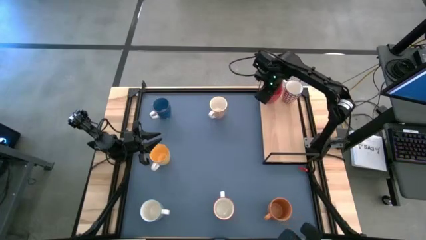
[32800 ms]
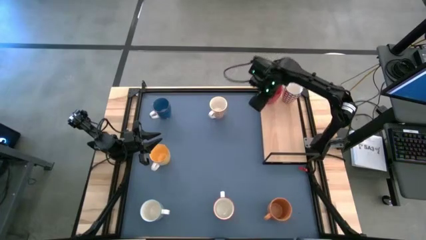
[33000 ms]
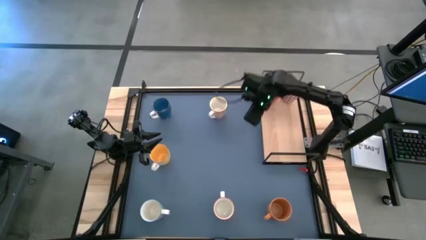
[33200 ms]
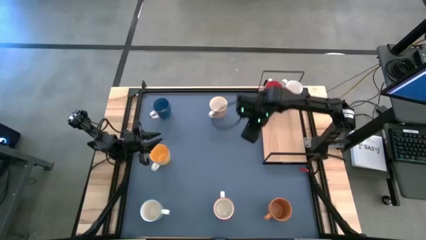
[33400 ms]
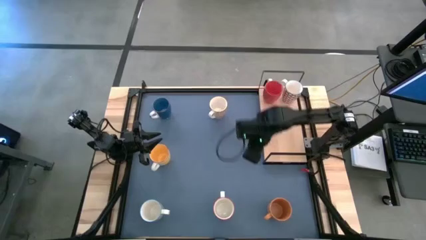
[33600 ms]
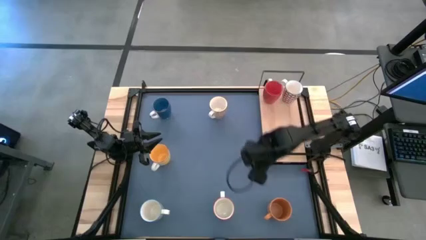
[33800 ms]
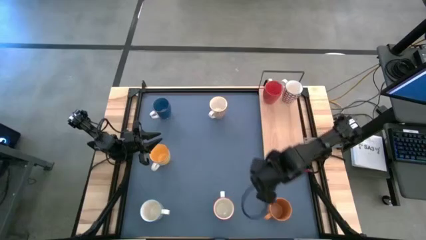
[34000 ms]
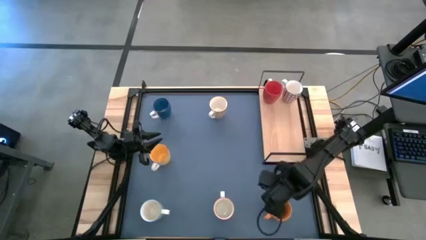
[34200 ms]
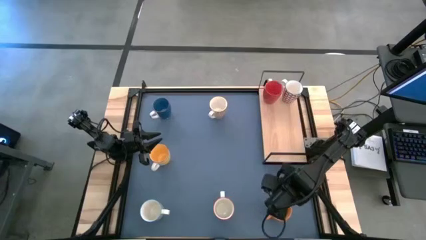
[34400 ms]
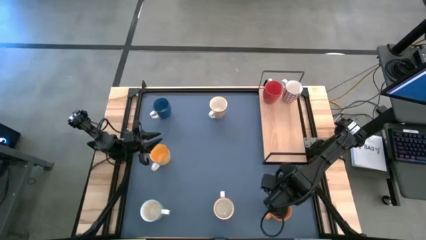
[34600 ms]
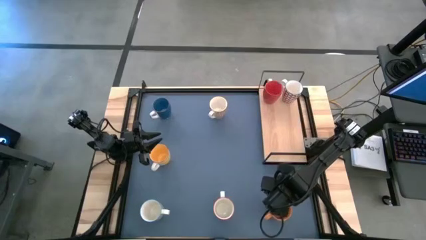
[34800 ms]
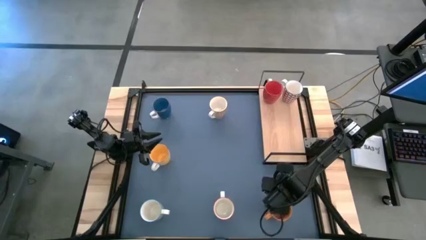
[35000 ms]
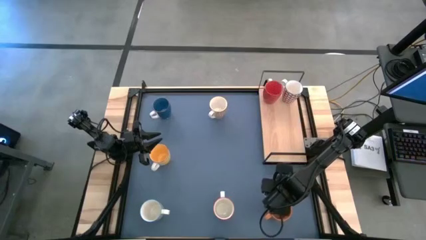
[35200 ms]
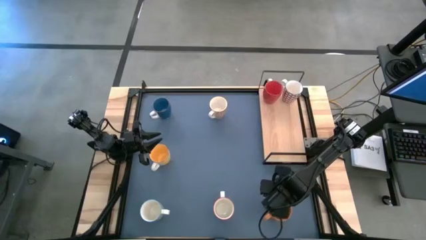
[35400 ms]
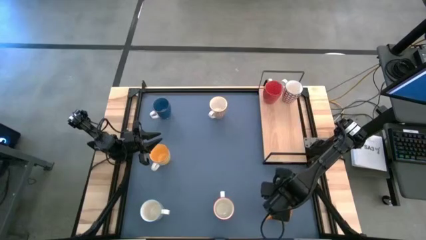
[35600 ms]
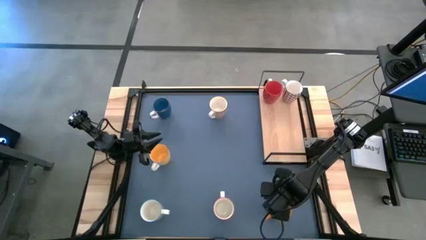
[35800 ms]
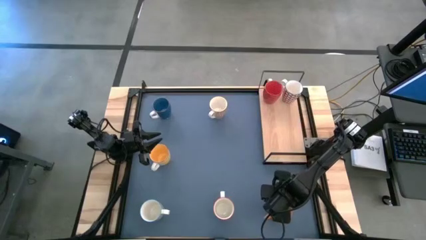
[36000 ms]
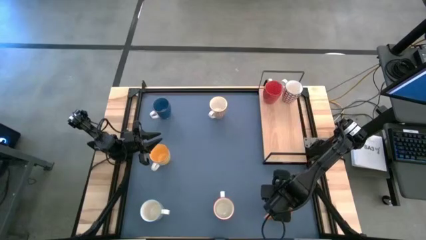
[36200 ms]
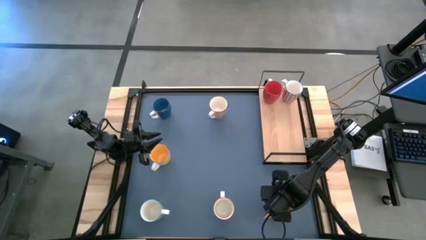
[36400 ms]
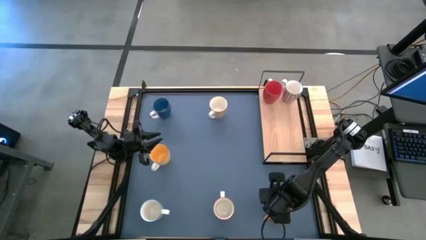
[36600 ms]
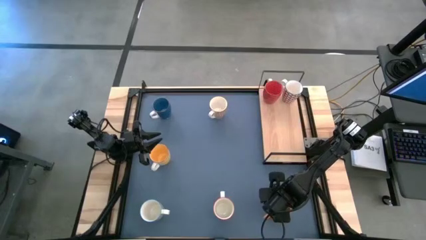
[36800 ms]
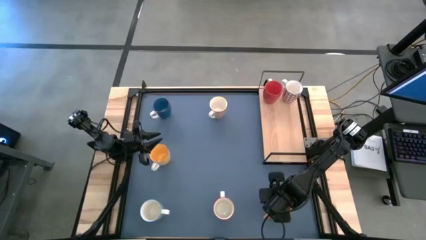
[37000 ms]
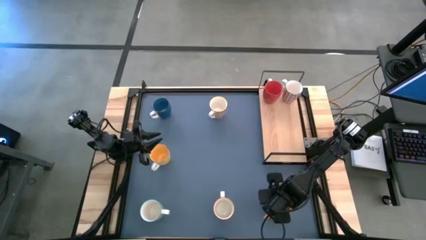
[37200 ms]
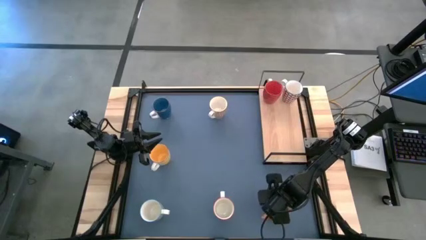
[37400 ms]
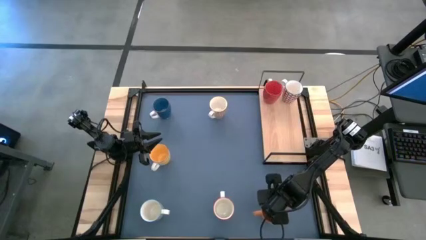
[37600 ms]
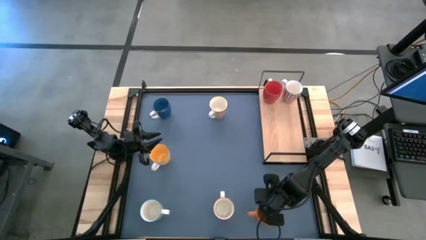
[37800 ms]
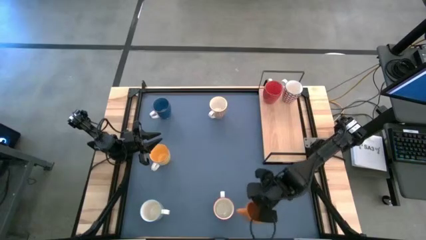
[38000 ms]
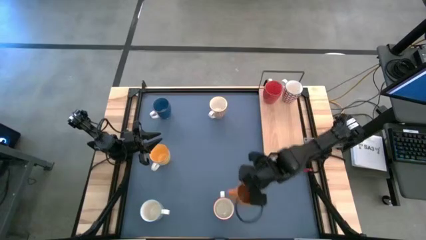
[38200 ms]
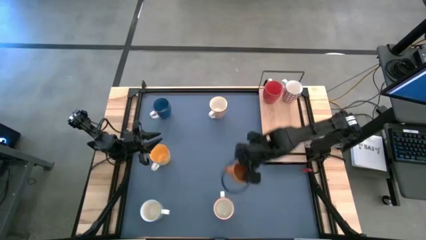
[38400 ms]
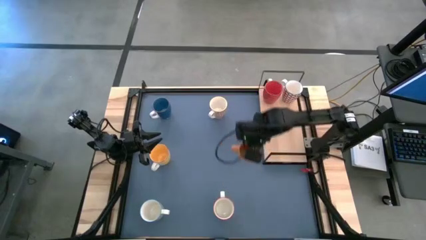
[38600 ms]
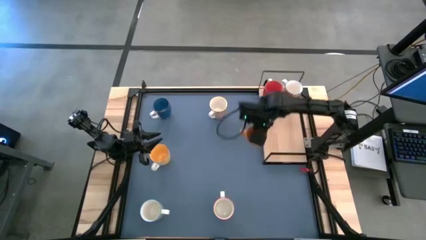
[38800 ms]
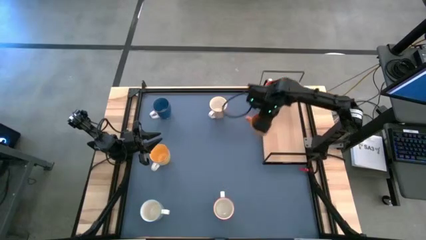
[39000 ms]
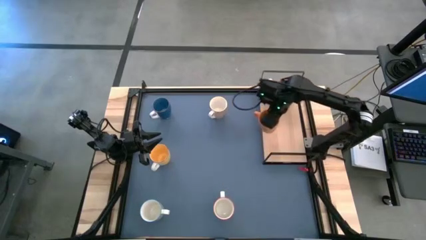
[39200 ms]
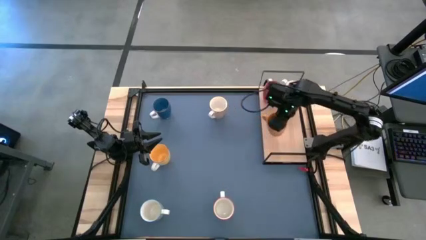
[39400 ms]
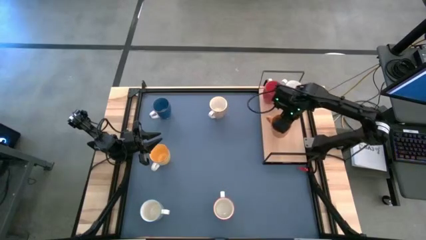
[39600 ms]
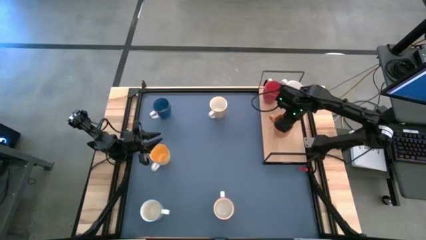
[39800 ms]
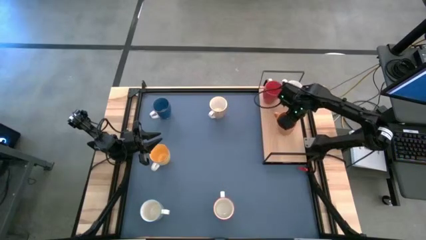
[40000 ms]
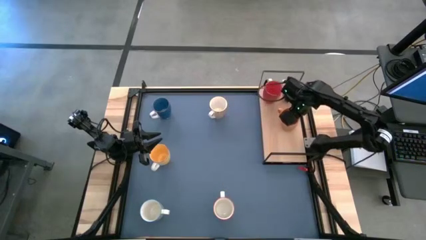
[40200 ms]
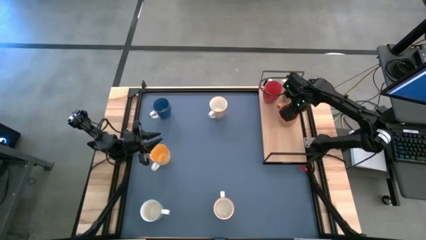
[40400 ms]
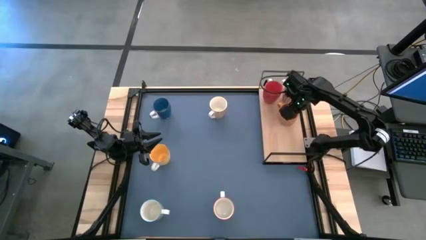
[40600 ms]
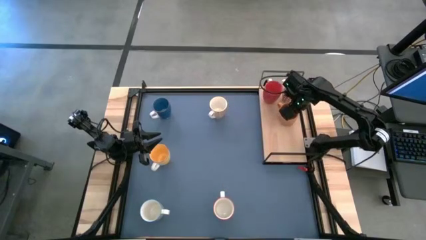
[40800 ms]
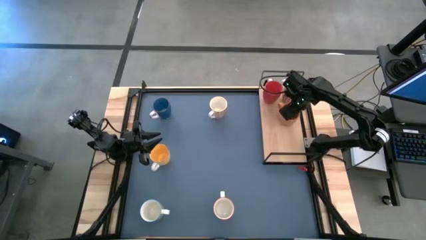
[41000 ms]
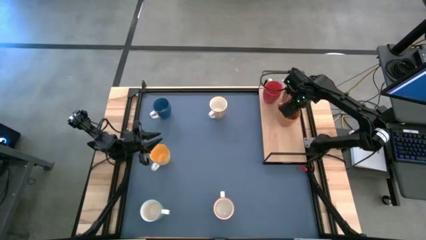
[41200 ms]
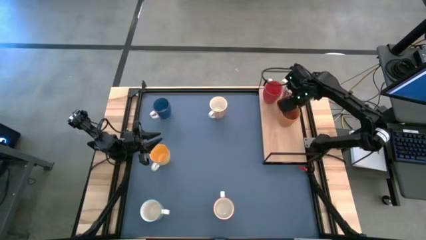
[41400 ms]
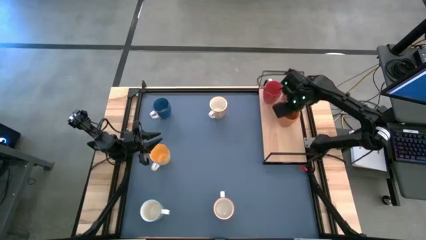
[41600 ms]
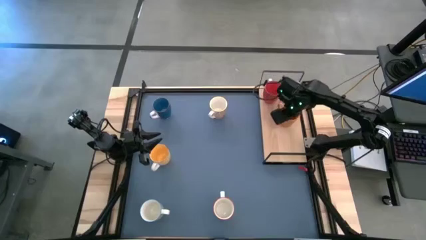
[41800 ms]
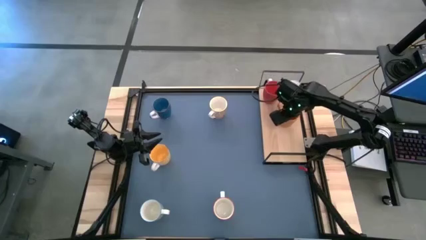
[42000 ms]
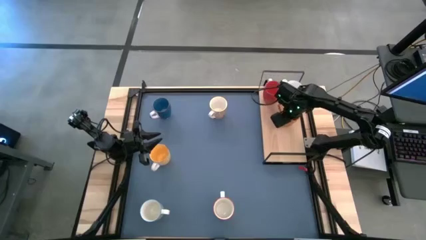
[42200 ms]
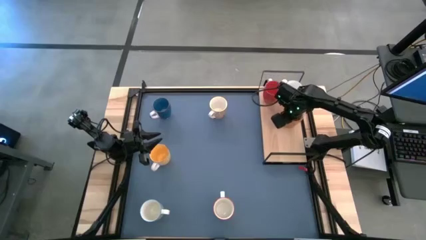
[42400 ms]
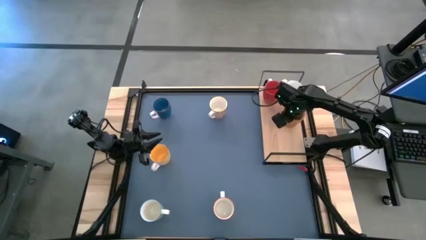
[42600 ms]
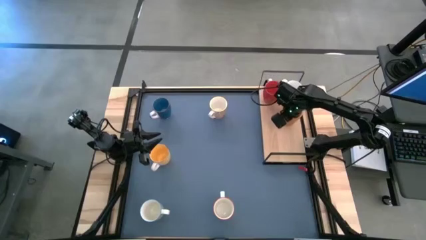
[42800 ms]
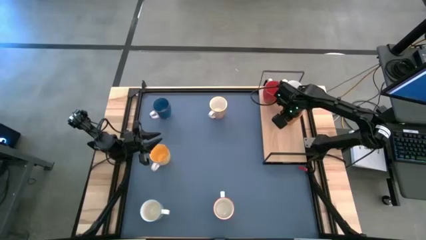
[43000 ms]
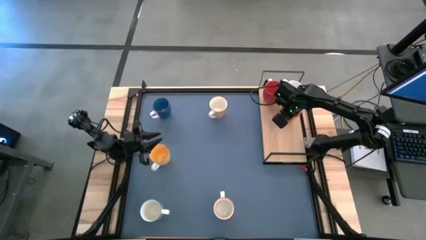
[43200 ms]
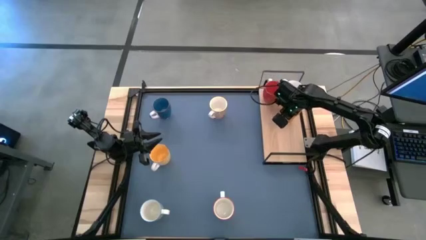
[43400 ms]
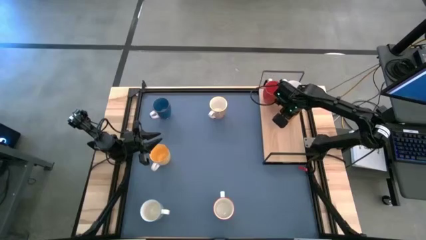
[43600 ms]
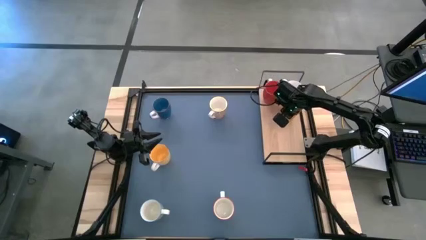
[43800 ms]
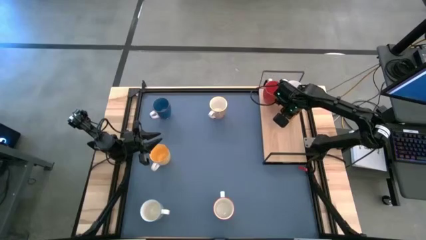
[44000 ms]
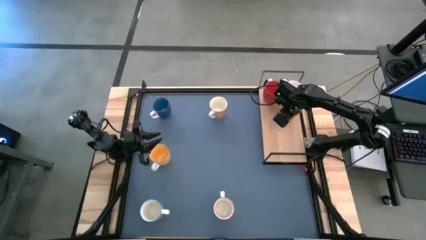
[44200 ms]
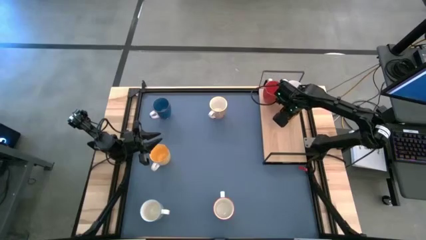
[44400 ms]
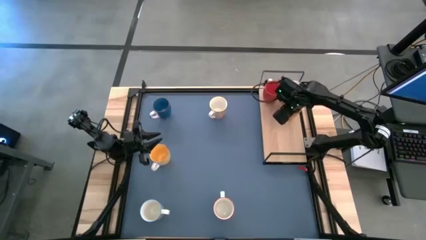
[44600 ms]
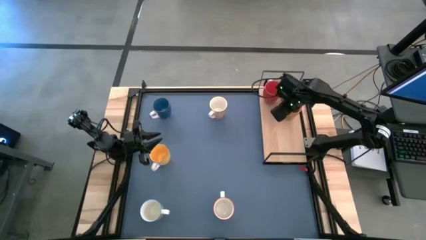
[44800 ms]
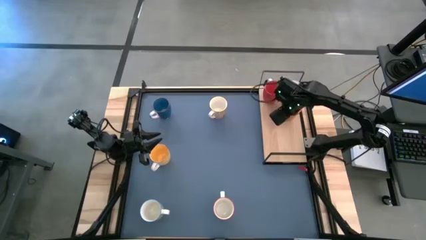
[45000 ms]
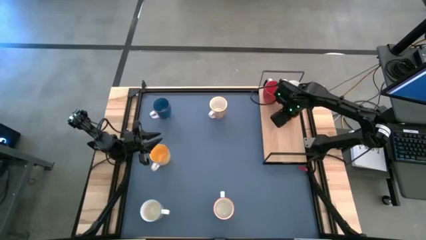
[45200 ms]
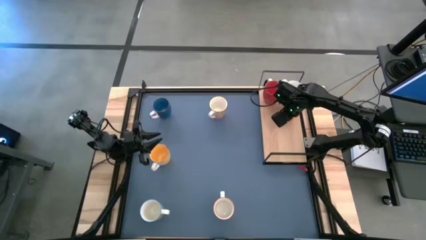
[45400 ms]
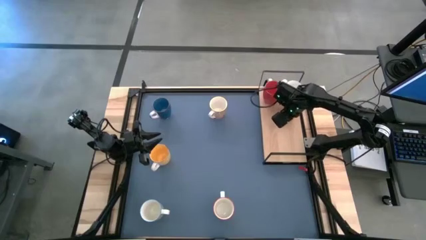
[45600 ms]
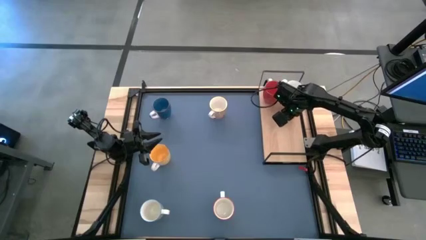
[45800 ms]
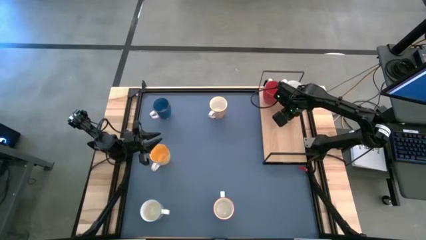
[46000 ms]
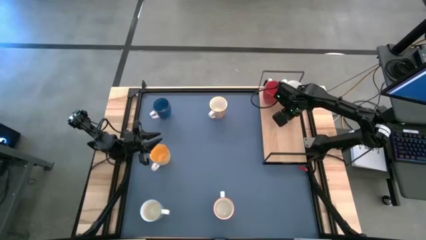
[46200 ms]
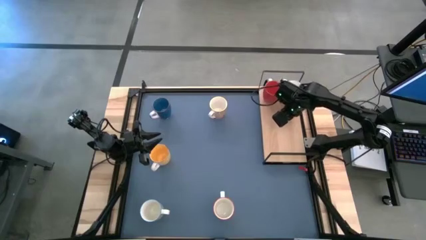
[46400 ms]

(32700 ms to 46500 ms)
Task: Place coffee mugs
Put the orange mug on the shelf

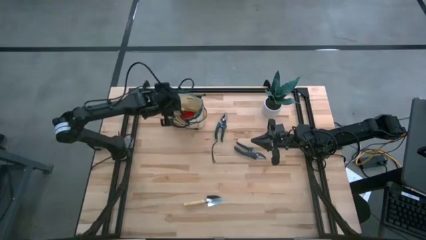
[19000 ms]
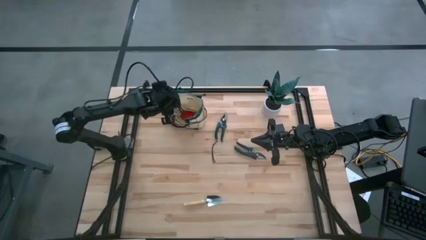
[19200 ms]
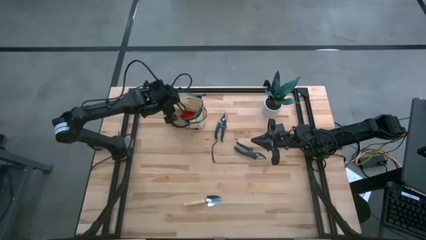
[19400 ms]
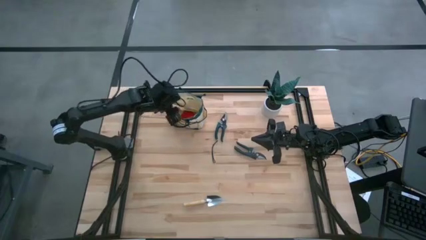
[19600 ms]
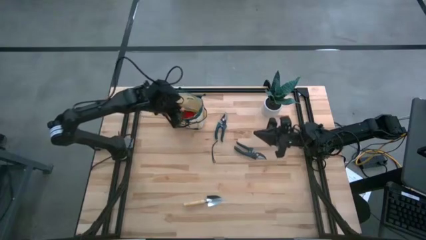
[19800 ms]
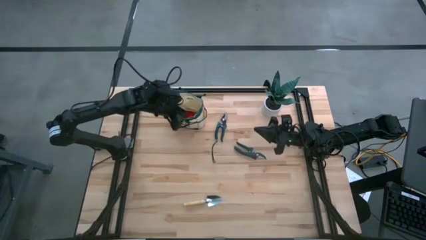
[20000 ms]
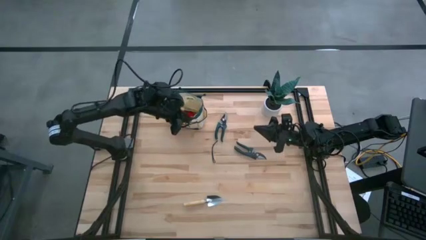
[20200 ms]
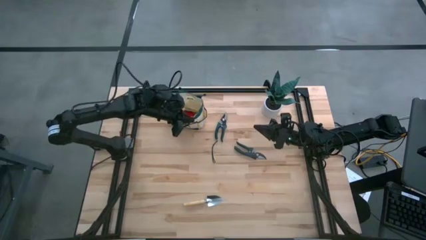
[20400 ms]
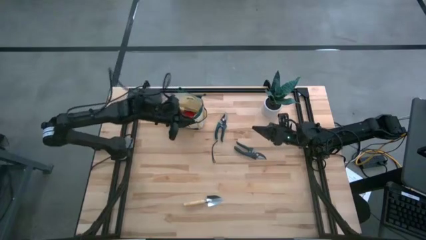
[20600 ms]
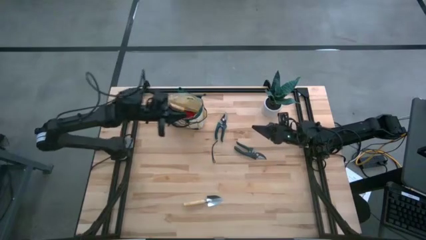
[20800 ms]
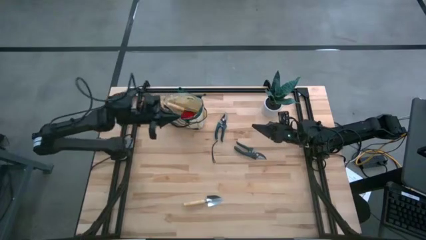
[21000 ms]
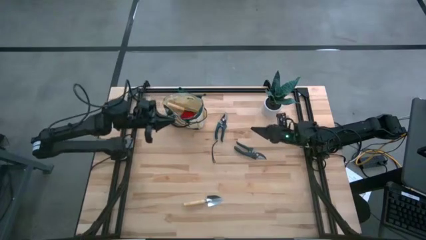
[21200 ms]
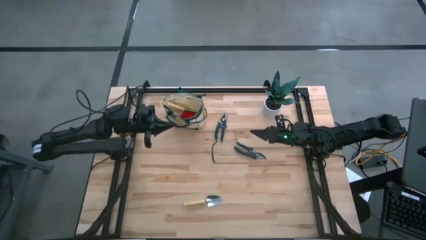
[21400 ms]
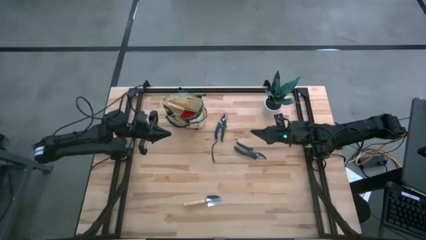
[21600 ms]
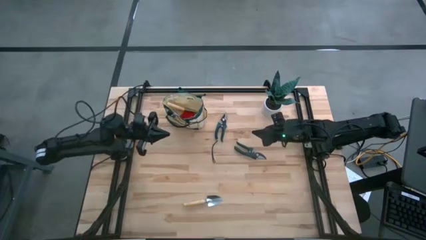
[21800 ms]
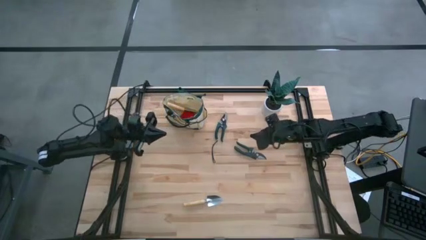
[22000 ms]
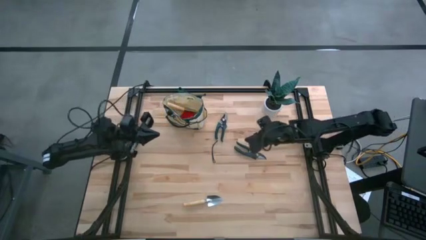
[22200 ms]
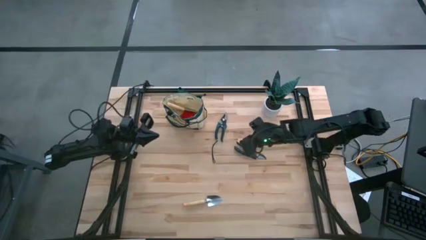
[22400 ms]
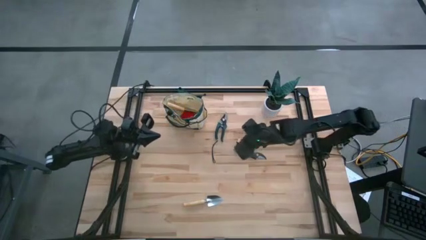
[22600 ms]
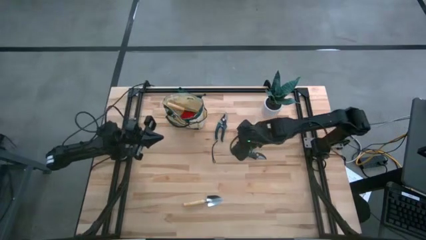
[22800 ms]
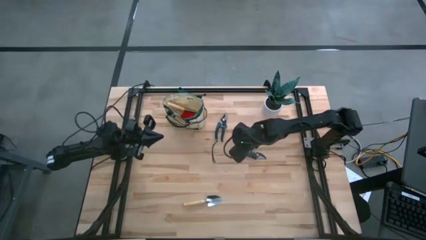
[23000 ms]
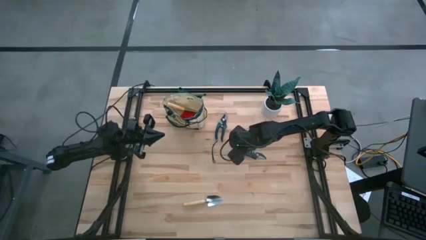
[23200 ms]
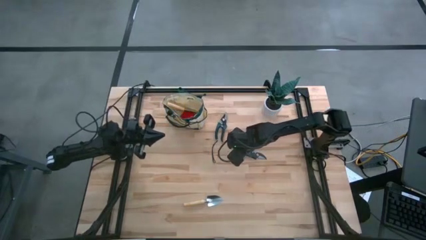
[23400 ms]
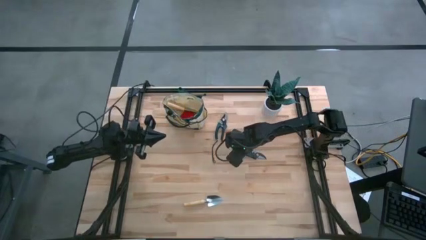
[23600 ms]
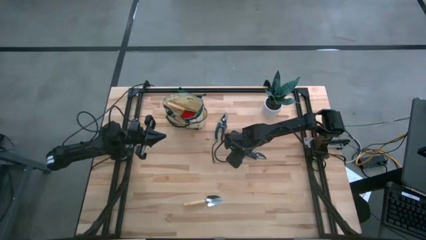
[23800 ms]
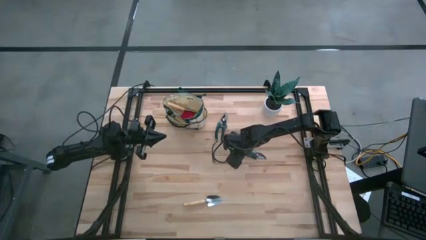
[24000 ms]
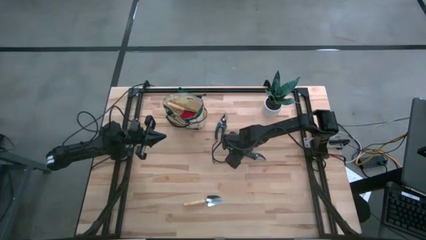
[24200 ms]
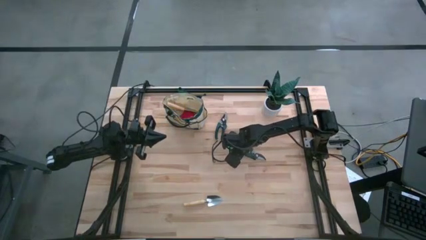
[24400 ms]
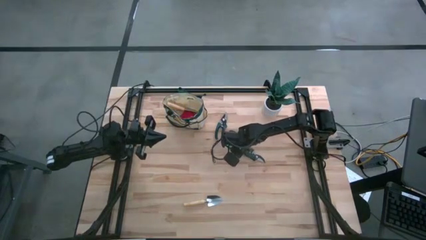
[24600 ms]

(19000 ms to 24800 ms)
Task: Pick & Place Garden tools in Gardening bag
Put the bottom shear scissor into the gardening bag
